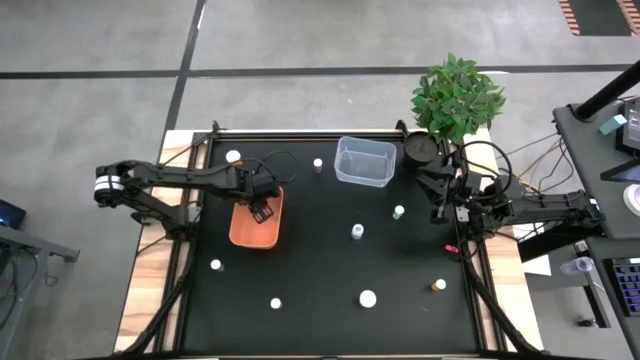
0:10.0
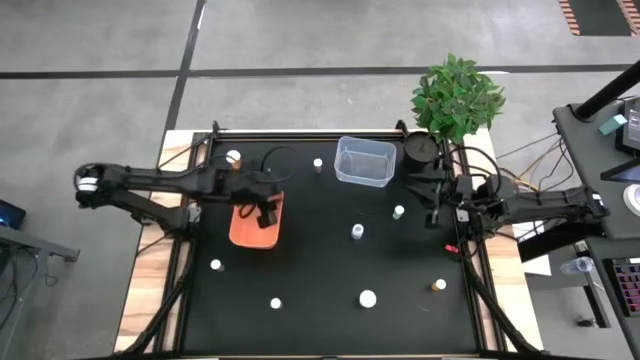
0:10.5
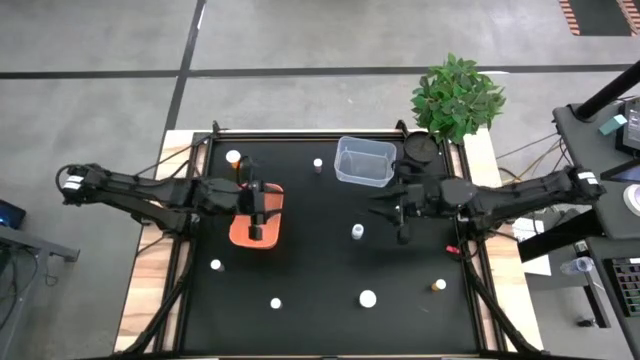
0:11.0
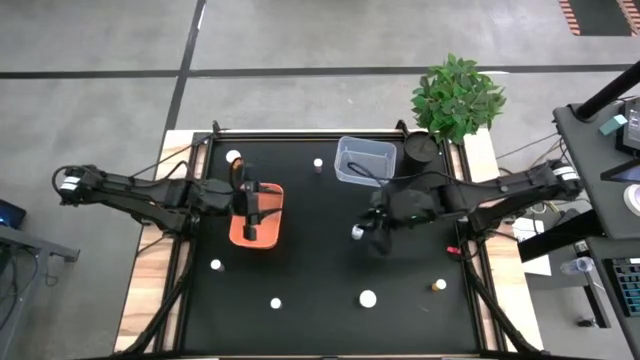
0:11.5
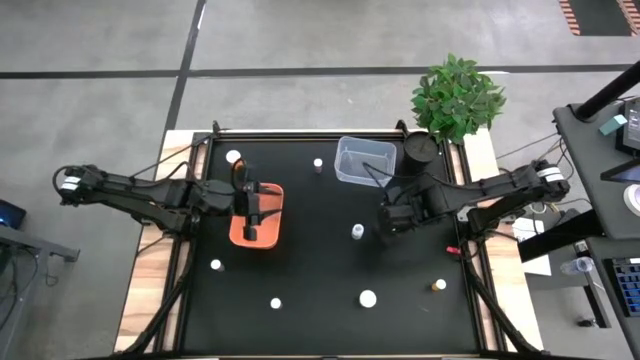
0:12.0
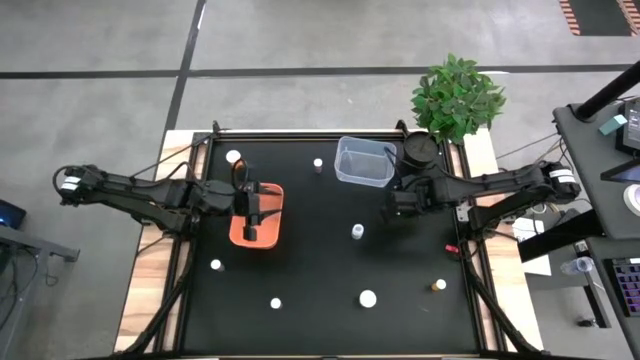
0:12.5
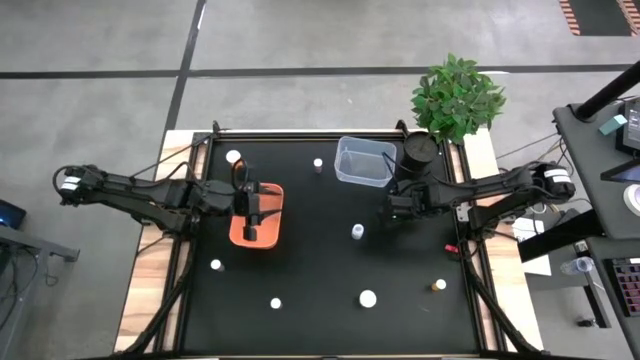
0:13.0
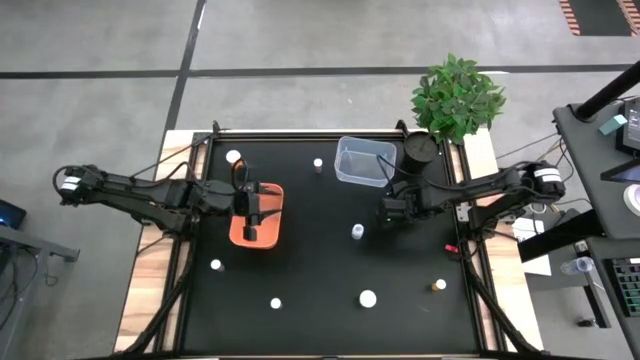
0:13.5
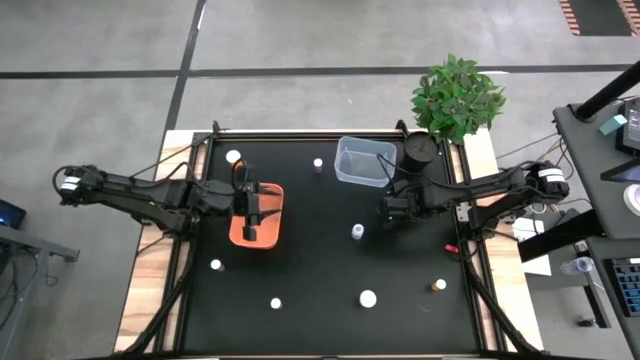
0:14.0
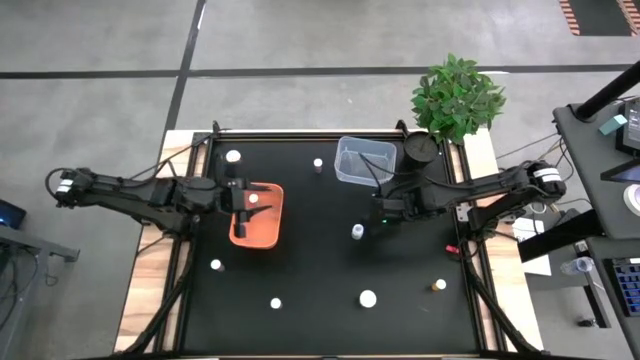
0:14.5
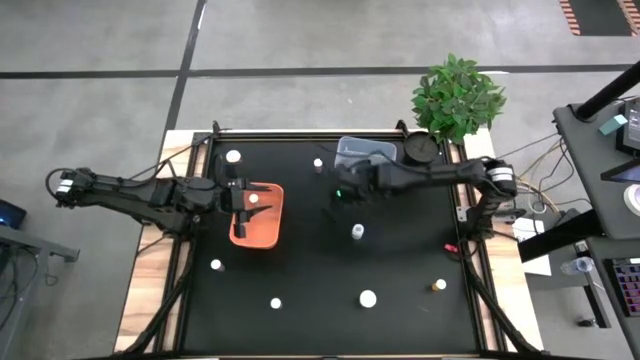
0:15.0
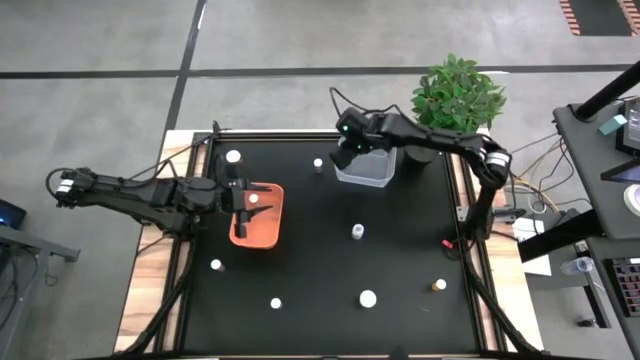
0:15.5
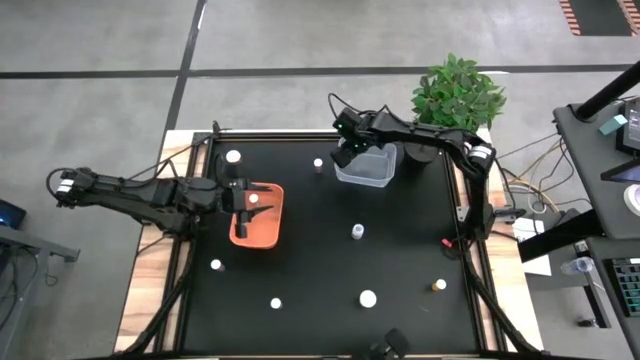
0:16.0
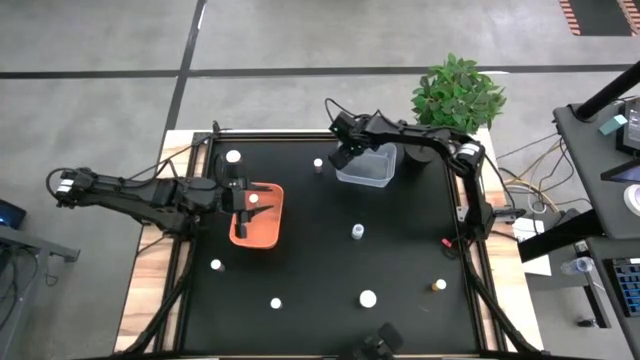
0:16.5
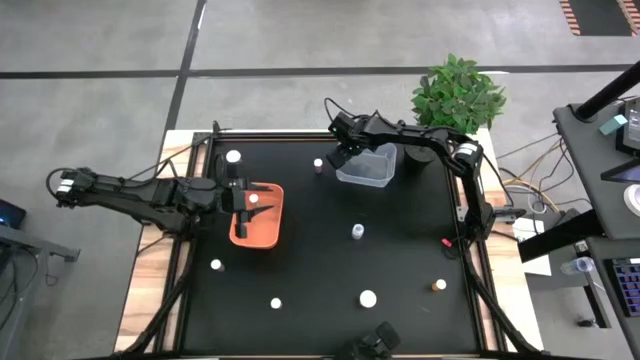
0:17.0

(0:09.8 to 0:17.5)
Task: Pick and place medicine bottles into bin by pill shape (circle, oval)
Put the green tablet pill bottle into the transparent bin

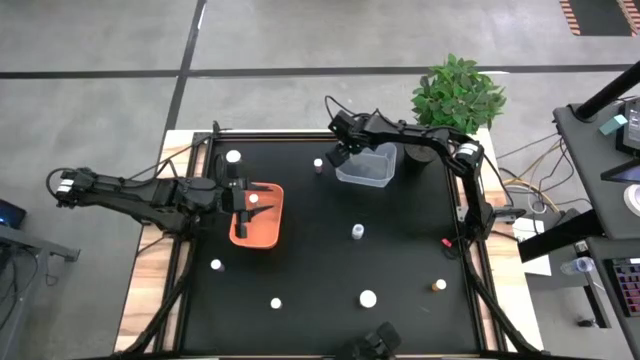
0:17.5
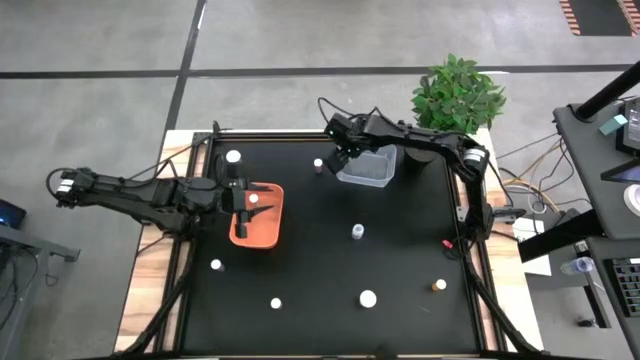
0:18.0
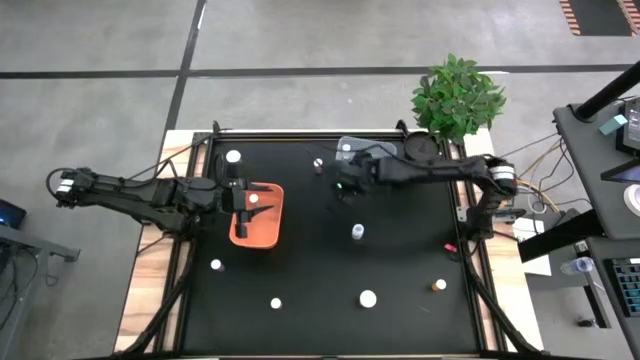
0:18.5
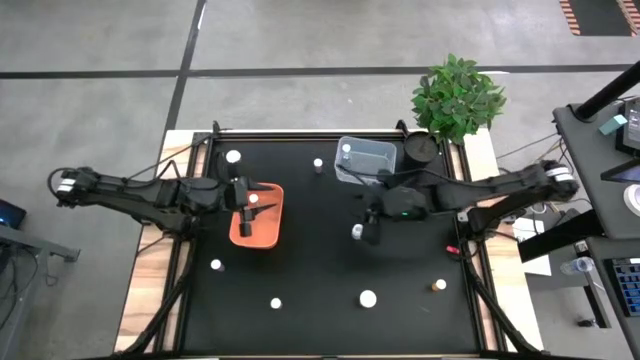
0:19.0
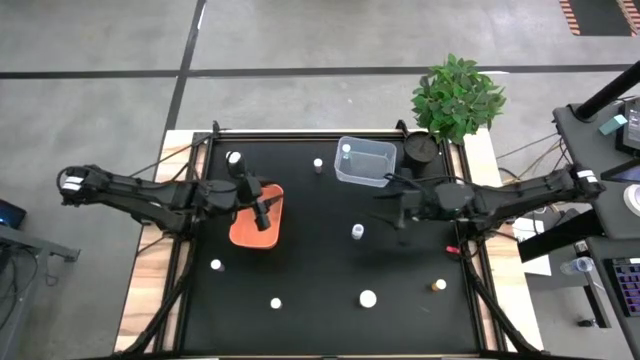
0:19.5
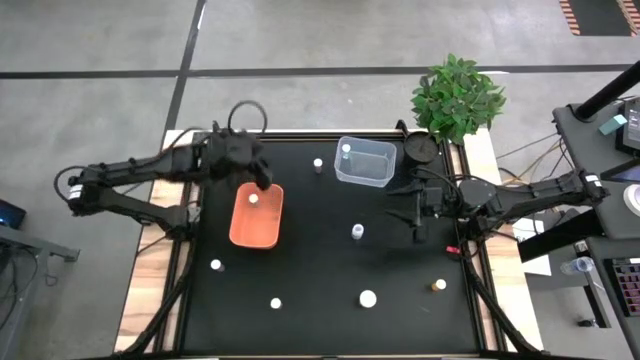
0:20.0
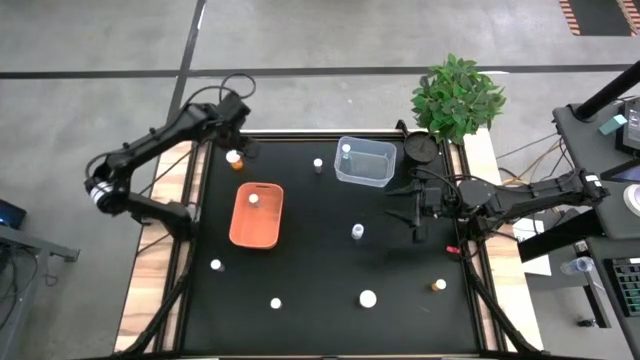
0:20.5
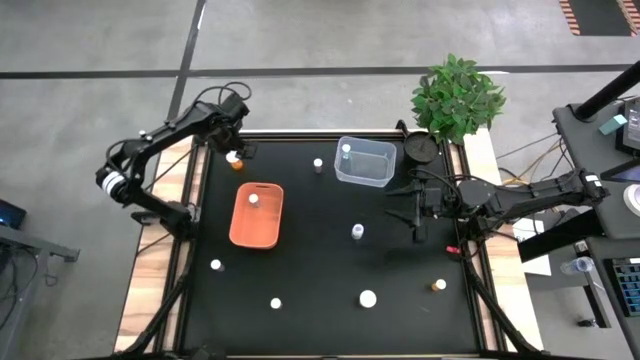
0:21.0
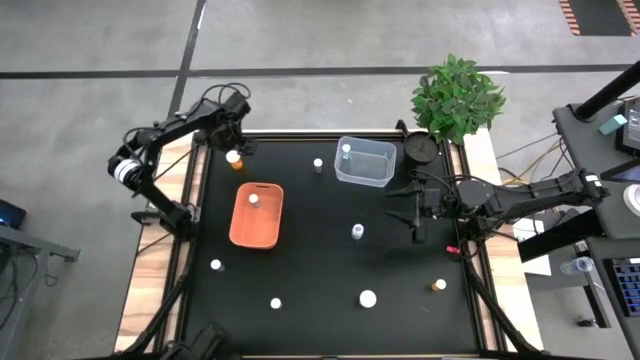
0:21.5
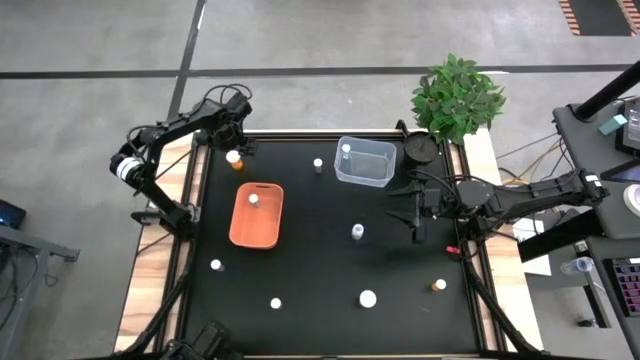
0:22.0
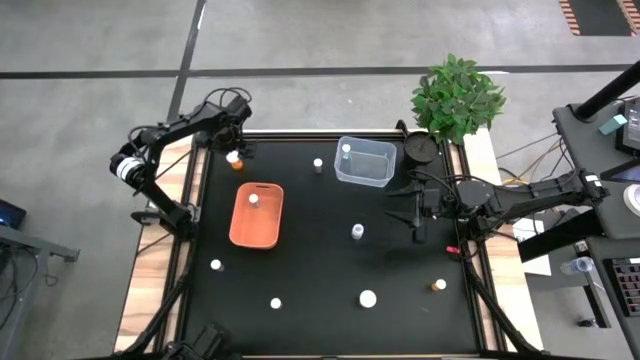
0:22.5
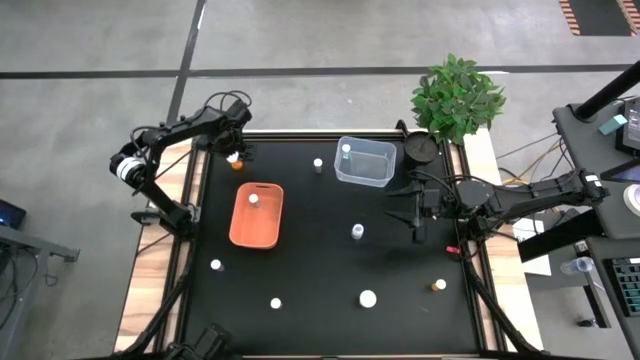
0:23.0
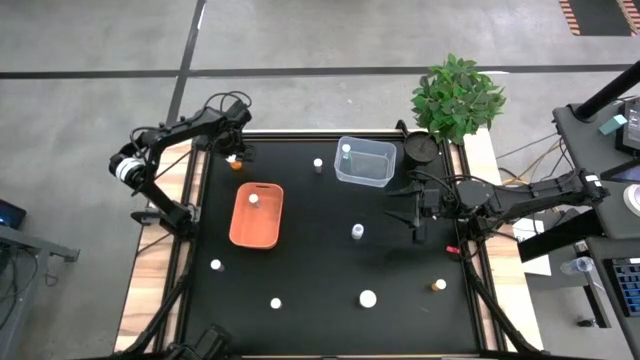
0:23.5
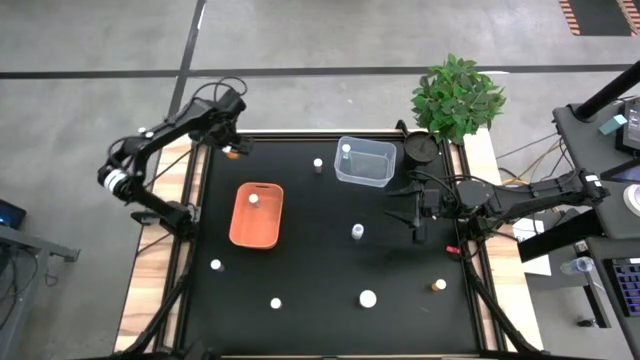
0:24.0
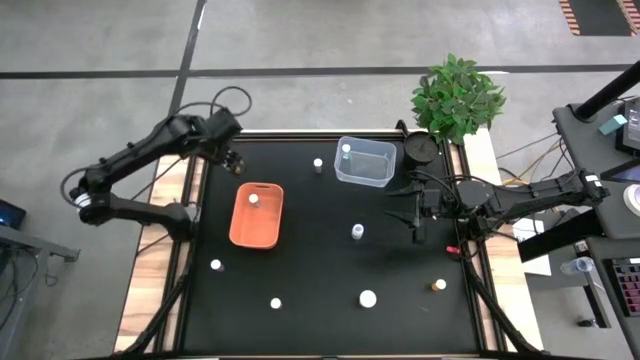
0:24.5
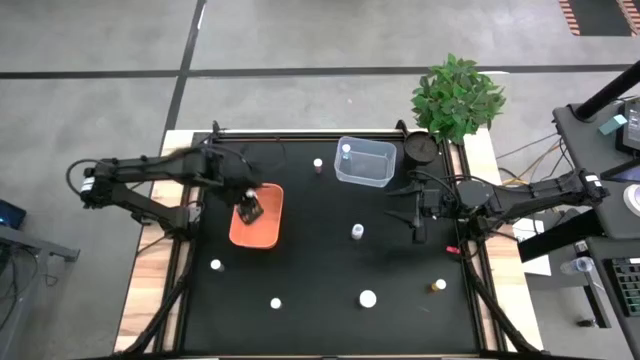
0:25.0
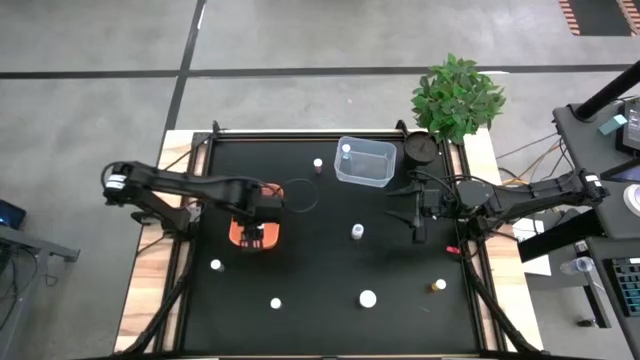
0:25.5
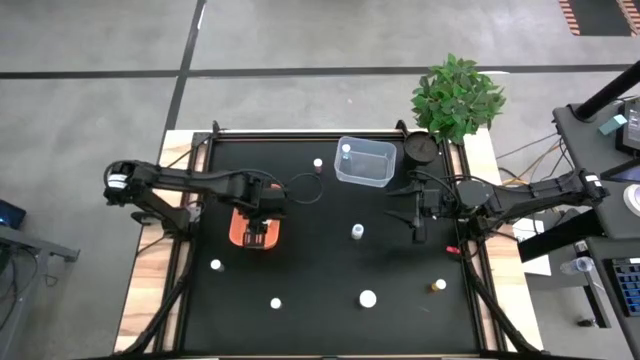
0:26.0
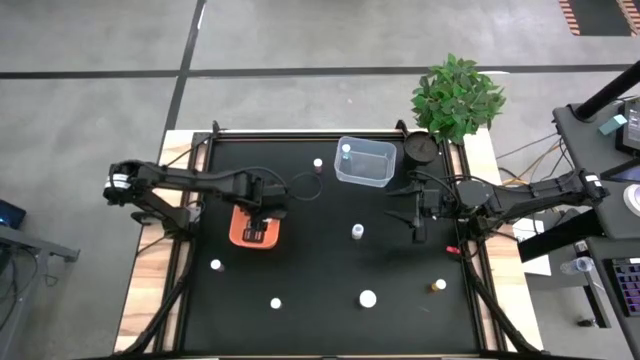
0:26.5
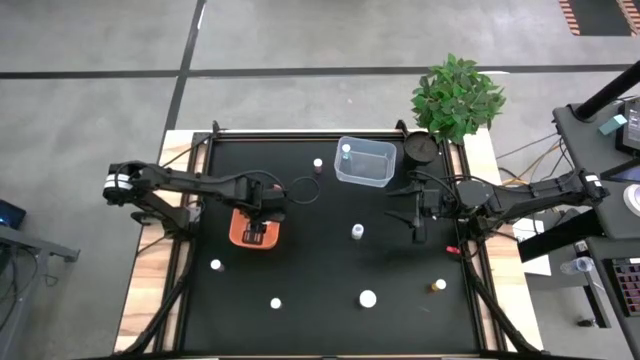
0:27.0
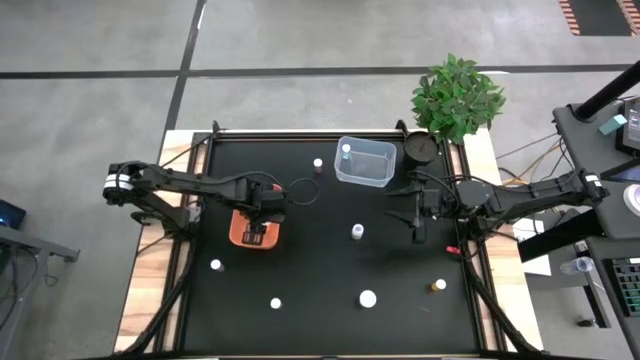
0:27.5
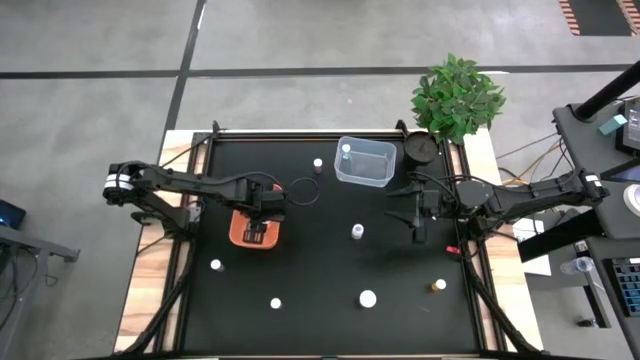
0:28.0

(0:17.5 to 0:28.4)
Put the large orange capsule pill bottle into the orange bin

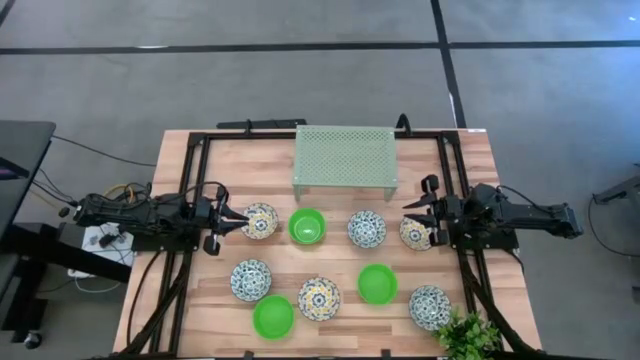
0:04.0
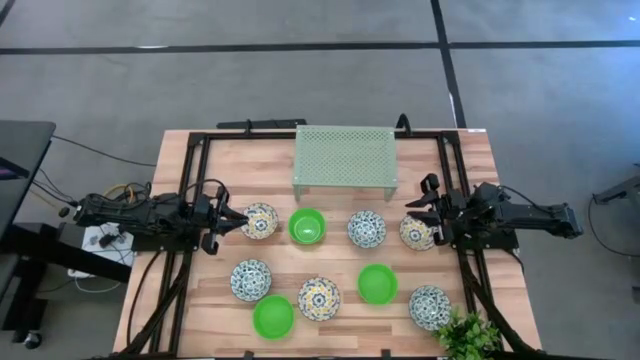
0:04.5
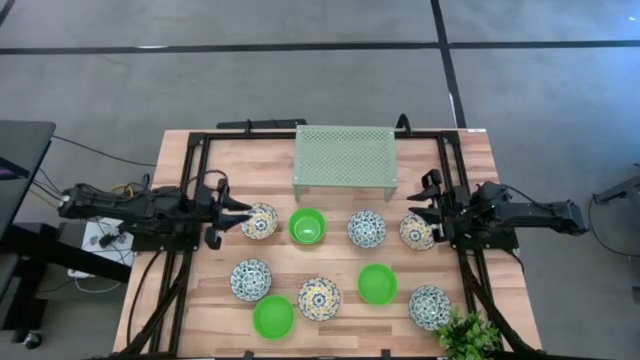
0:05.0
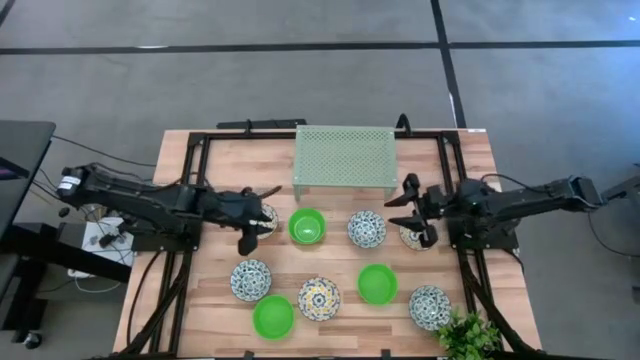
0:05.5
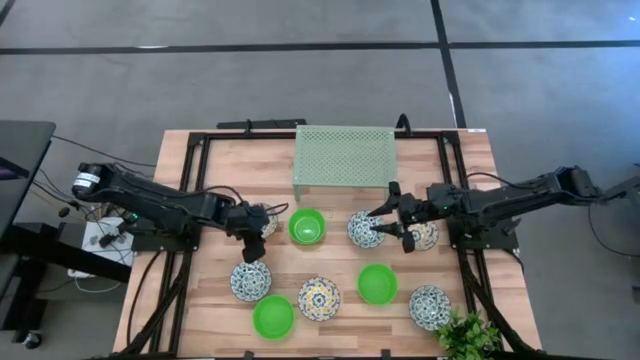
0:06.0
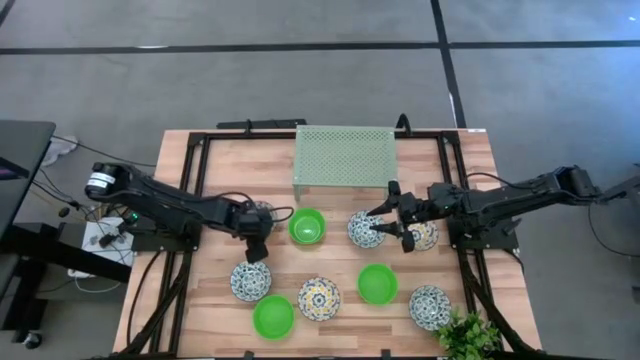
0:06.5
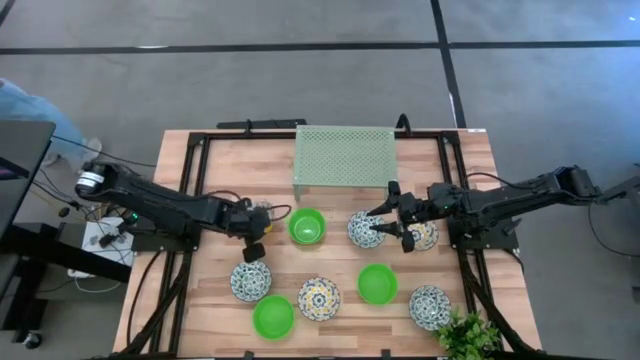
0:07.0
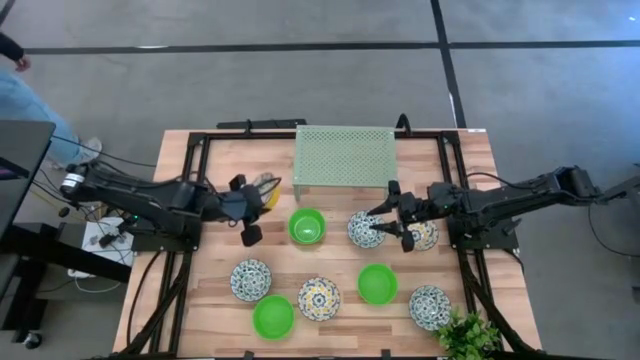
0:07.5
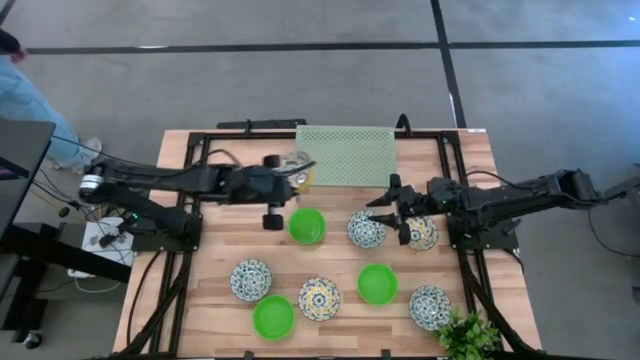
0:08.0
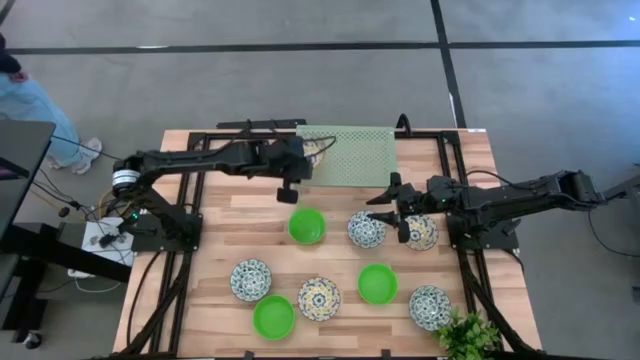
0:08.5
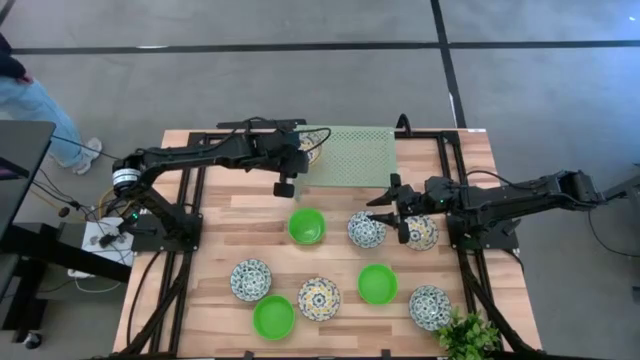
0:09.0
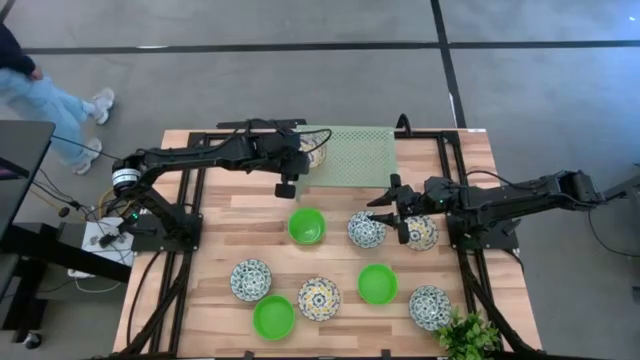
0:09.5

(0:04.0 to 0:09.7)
Task: Pick & Place Mini bowls
Put the top left yellow bowl on the shelf
